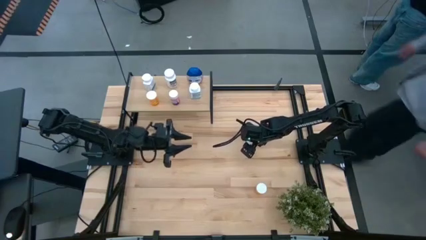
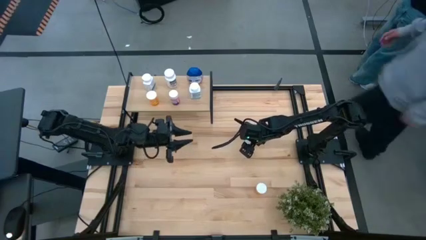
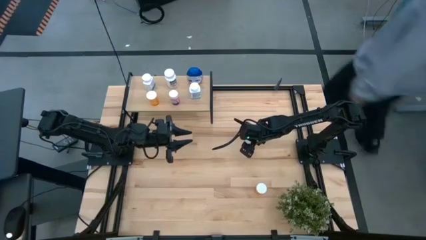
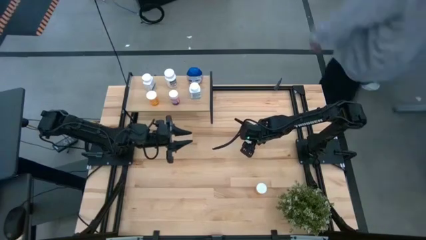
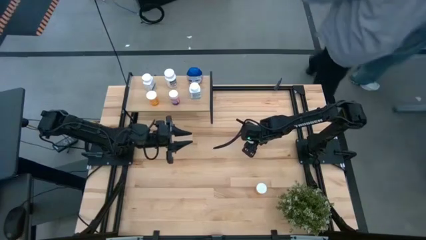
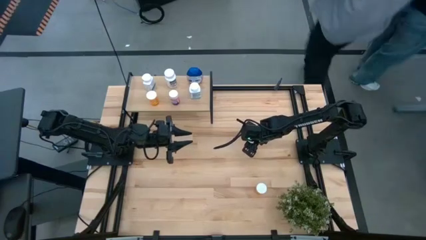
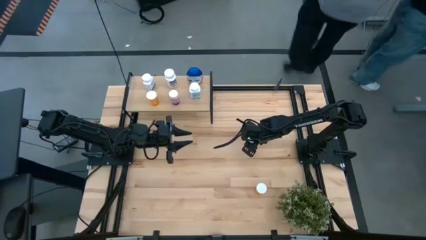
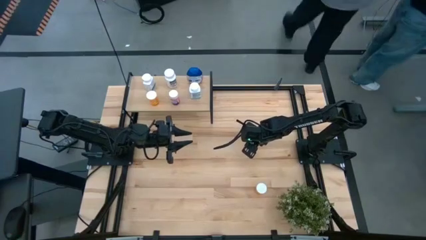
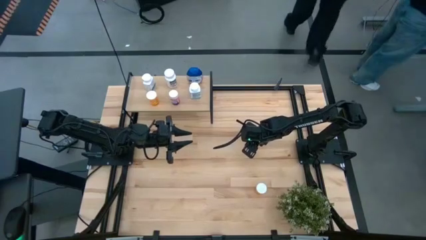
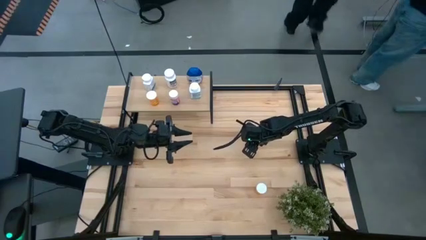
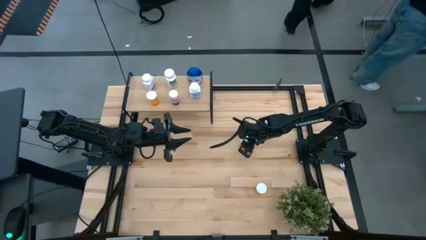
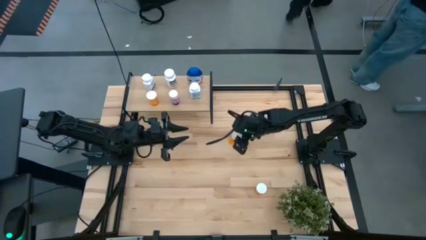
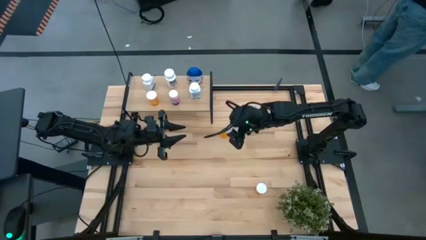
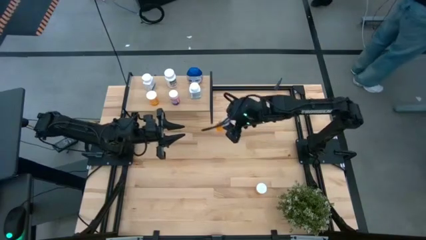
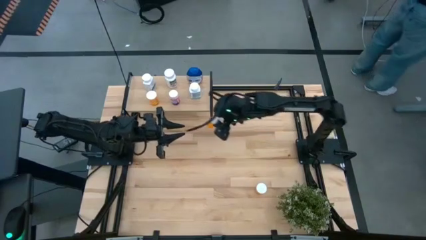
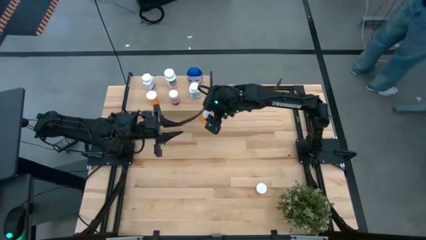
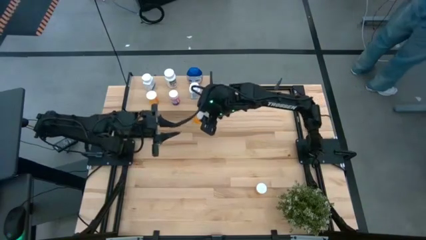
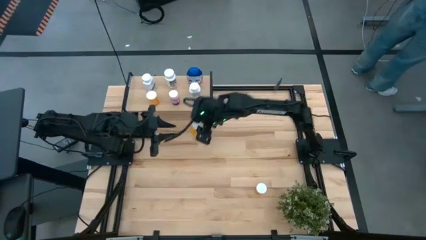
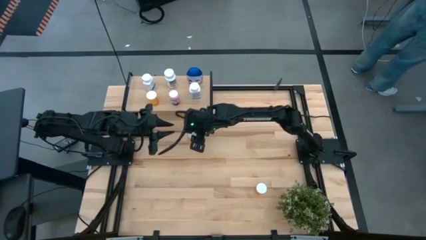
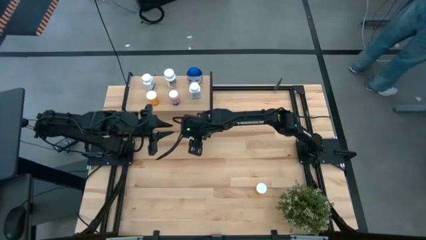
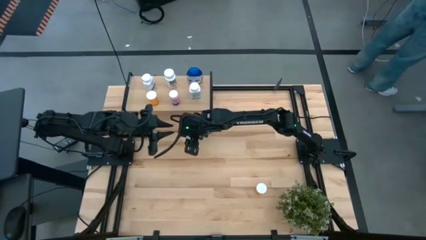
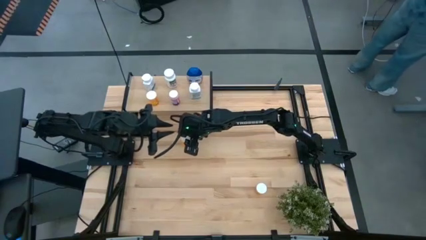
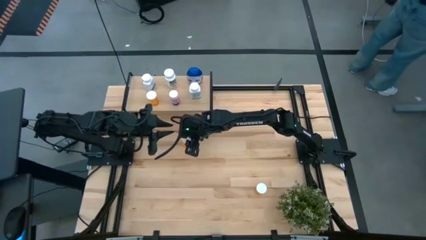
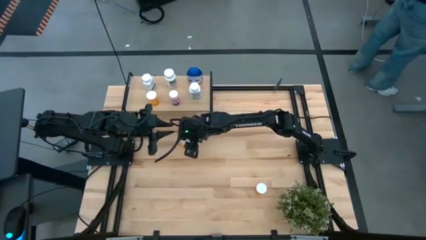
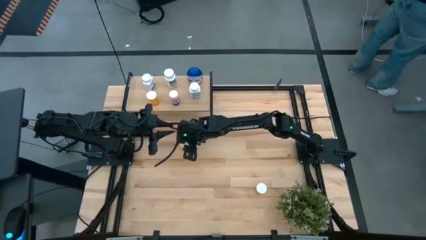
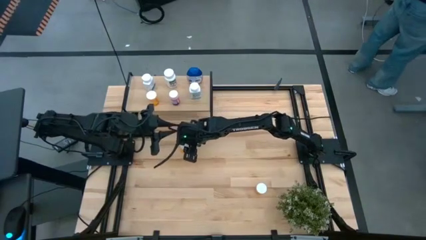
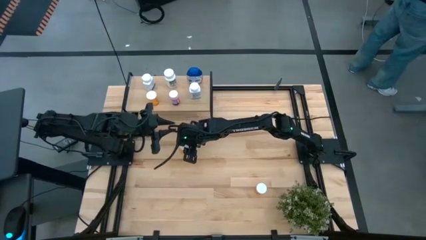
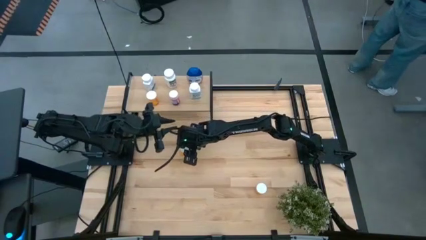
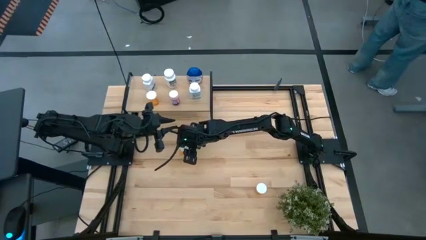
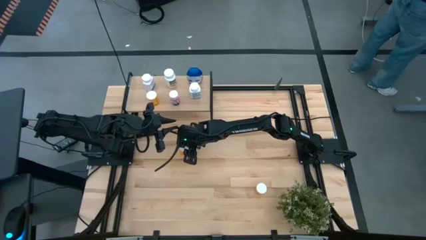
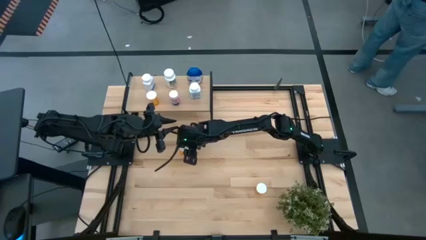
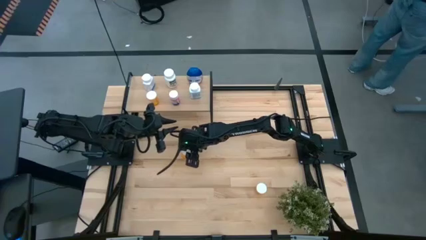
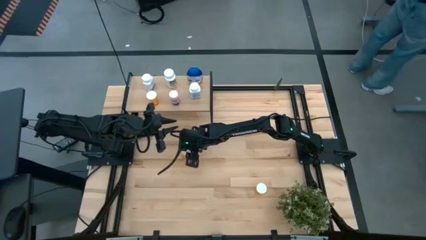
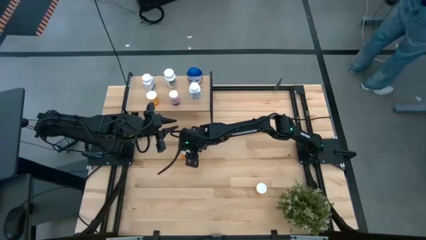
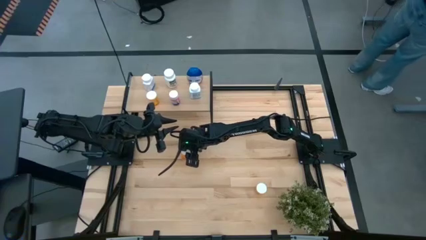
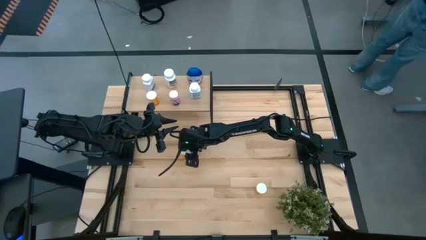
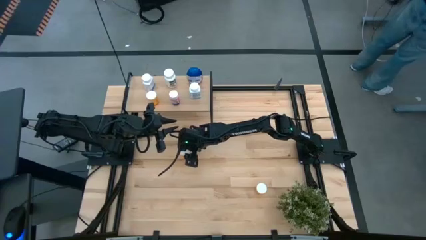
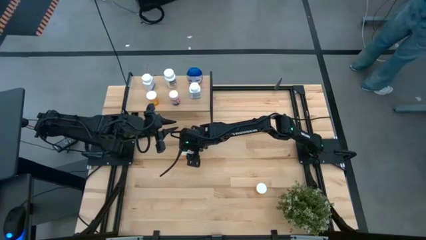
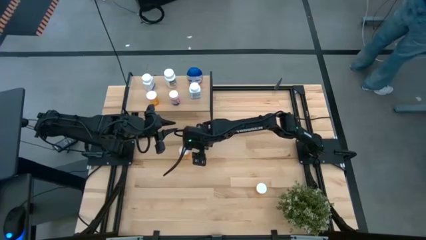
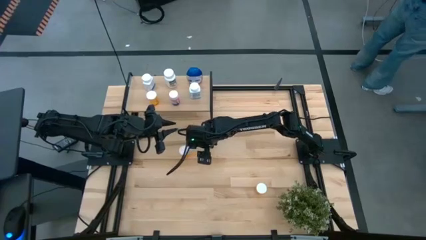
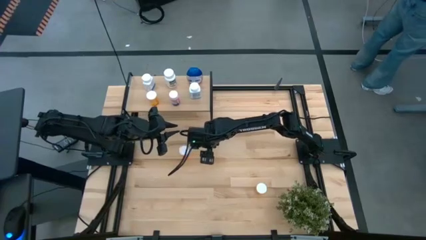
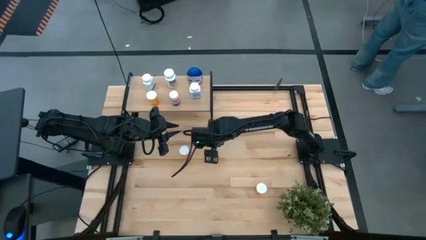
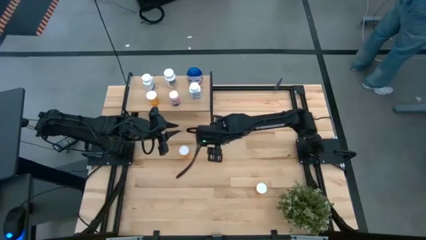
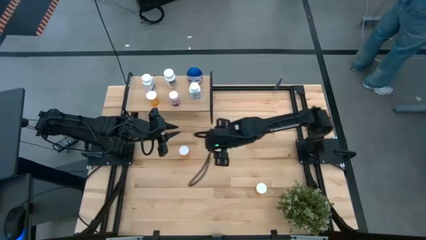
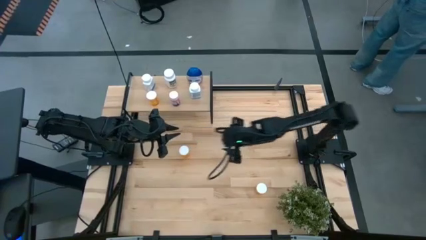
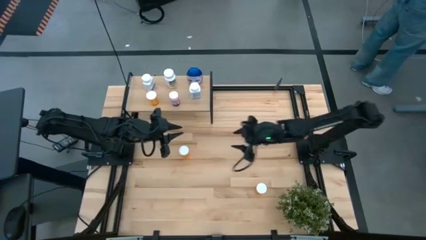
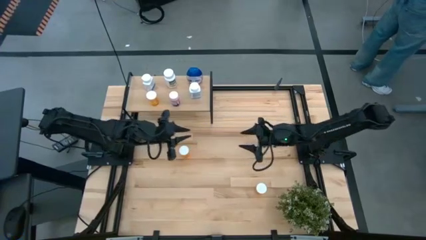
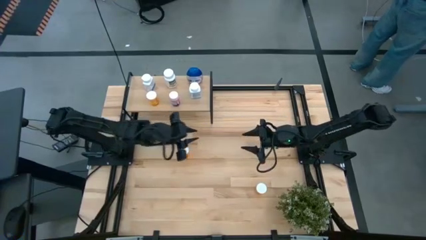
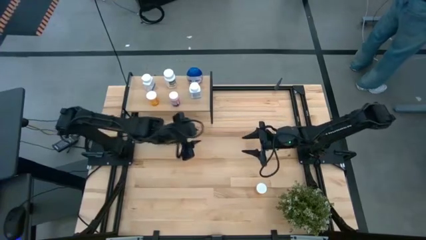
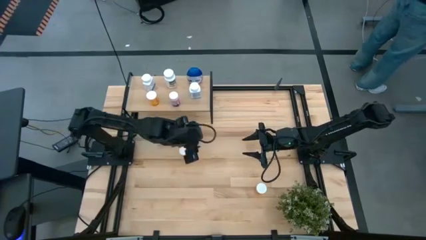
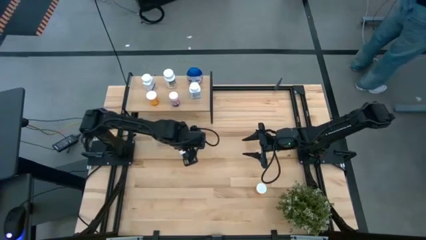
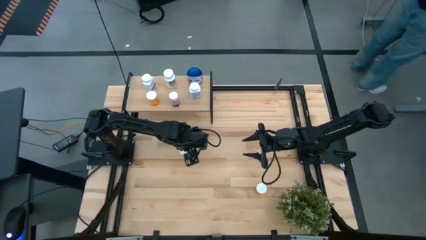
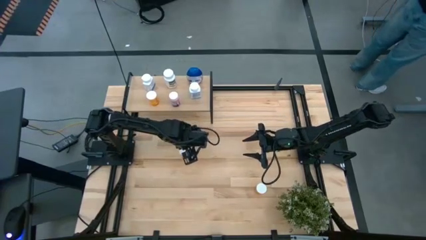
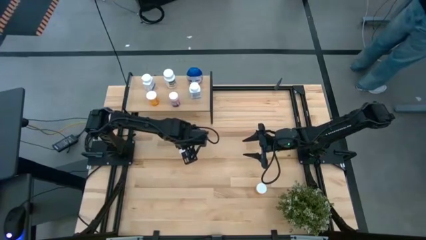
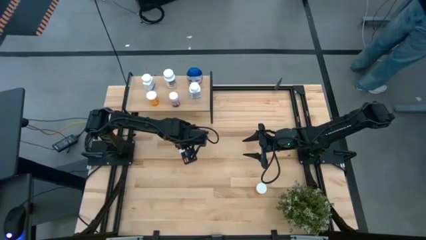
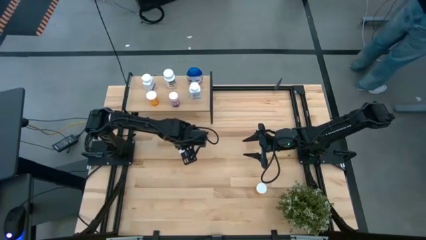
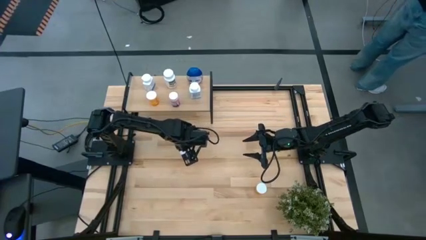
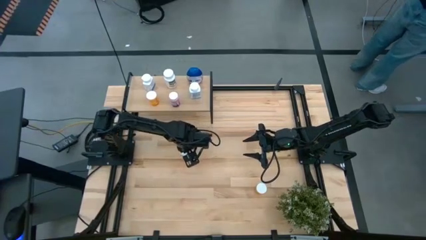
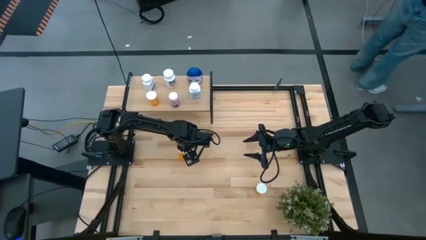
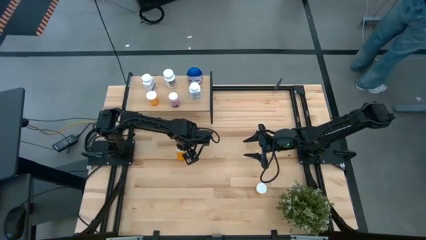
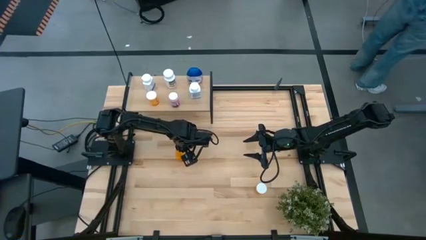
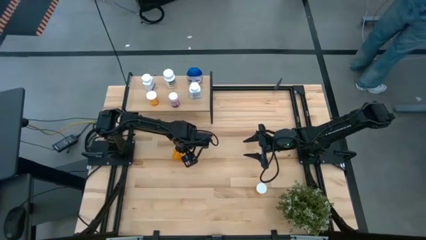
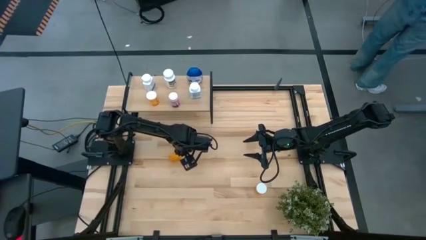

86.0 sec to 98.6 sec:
Task: Pick and place medicine bottles onto shelf by color
Put the top orange pill bottle on the shelf

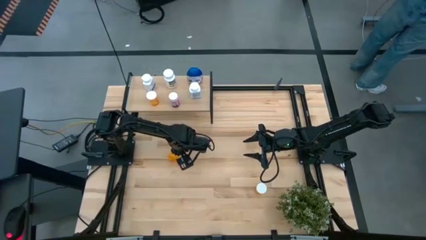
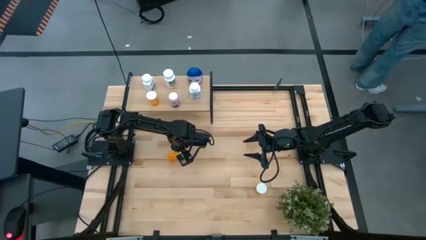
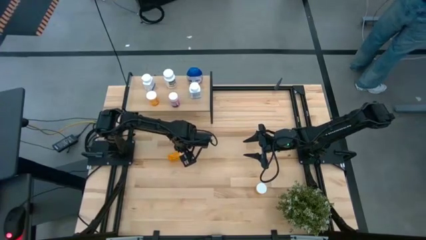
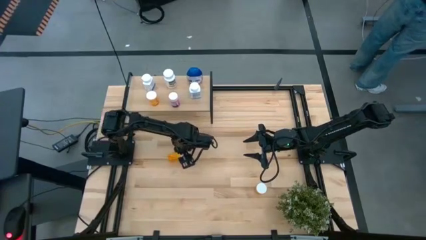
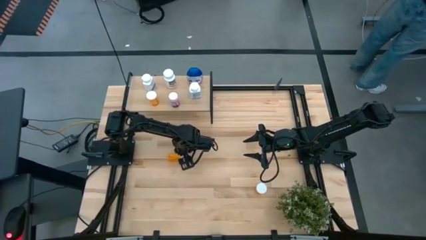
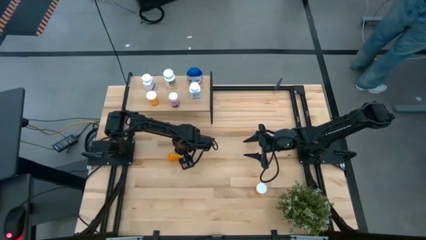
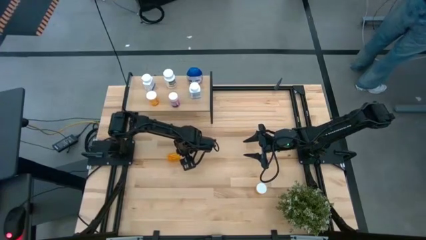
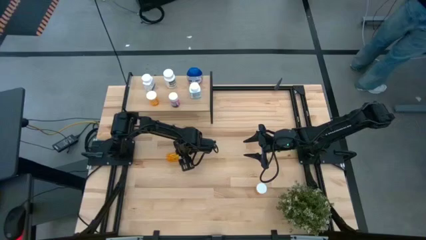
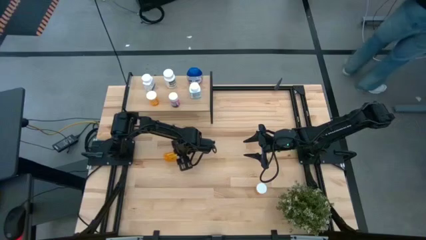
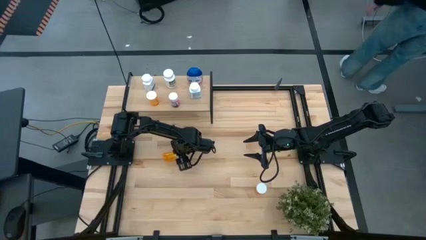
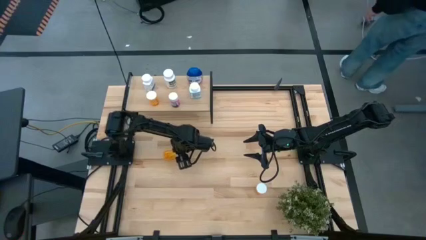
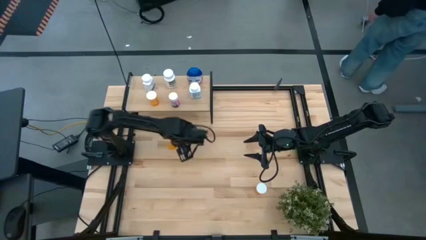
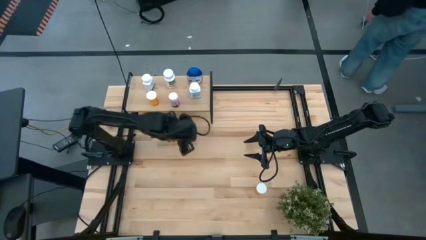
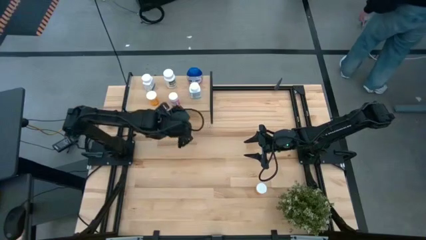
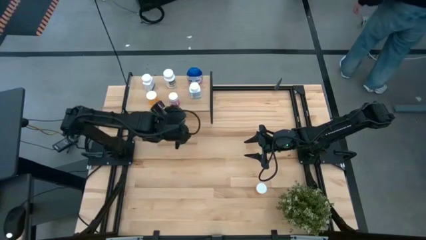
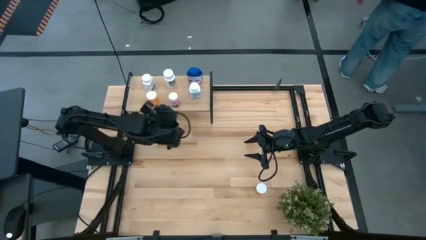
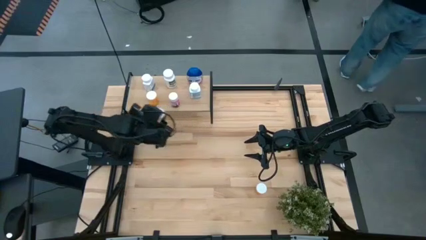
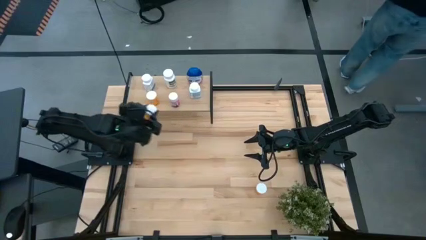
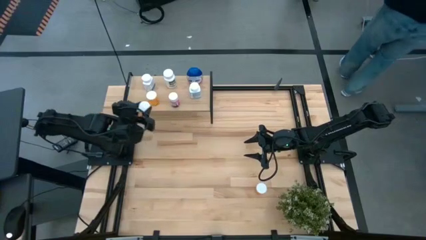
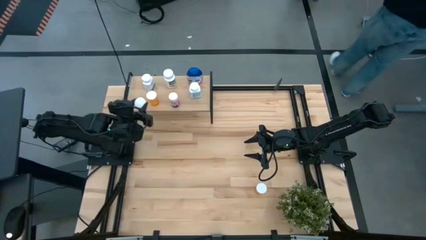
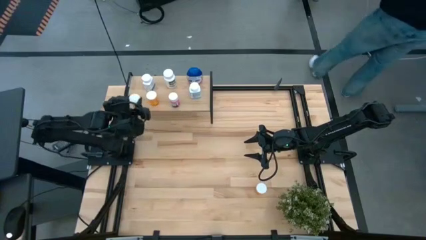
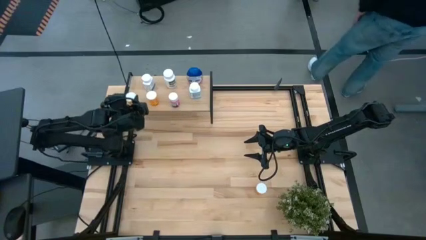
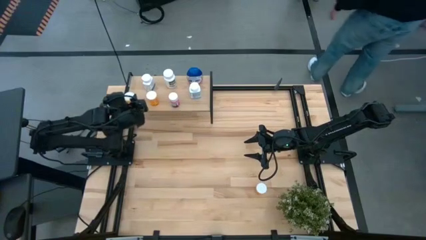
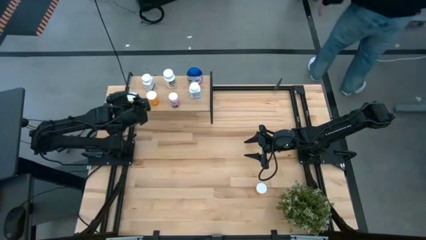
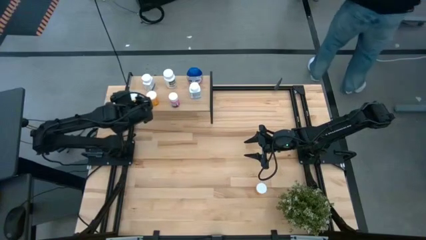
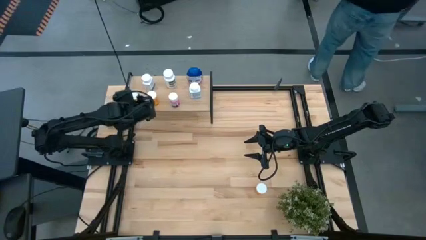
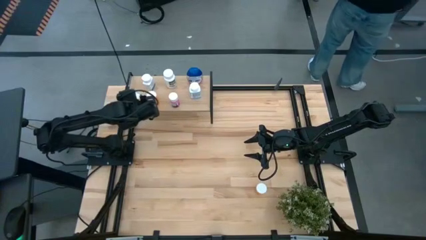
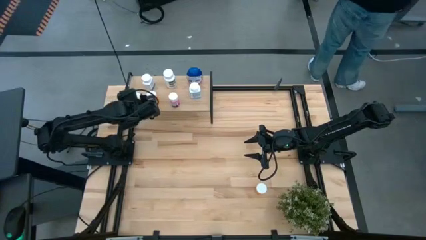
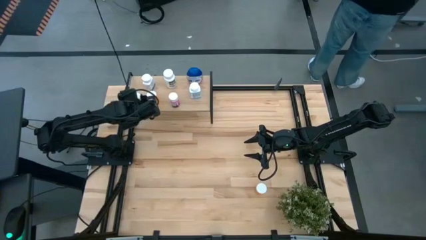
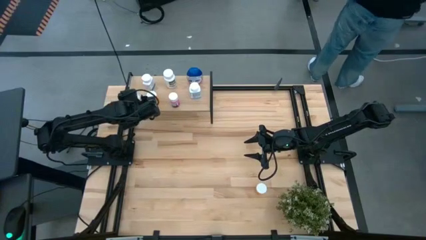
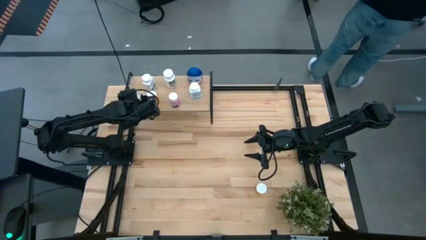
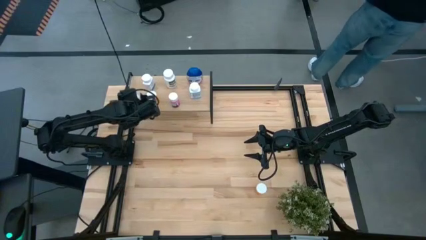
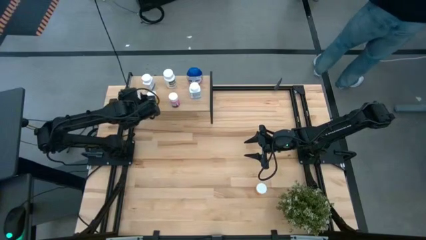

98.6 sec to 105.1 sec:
Put the top orange pill bottle on the shelf
